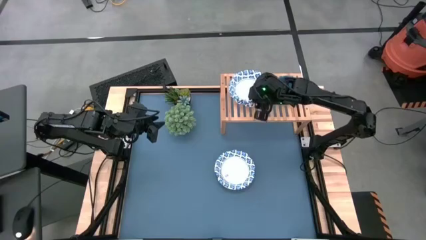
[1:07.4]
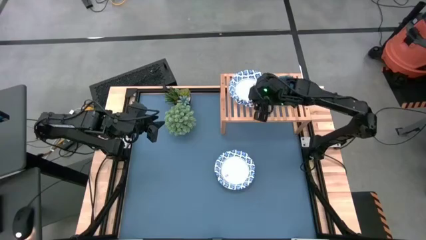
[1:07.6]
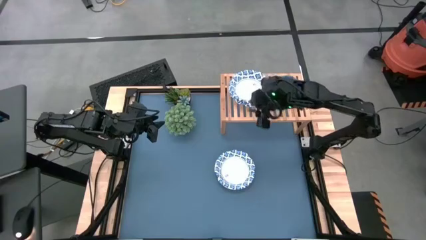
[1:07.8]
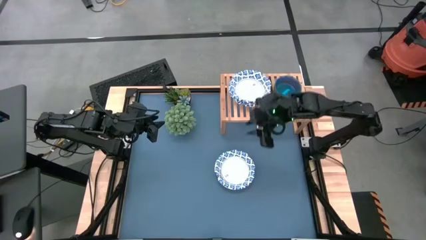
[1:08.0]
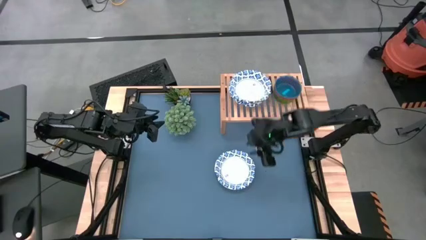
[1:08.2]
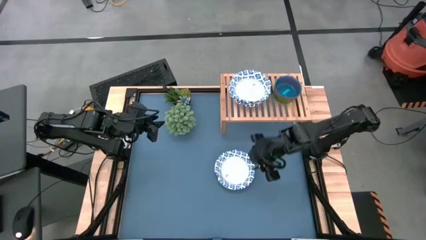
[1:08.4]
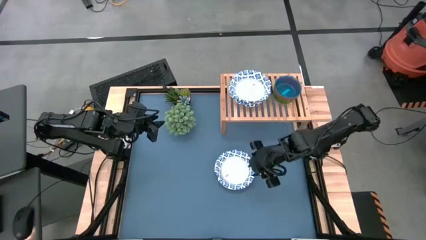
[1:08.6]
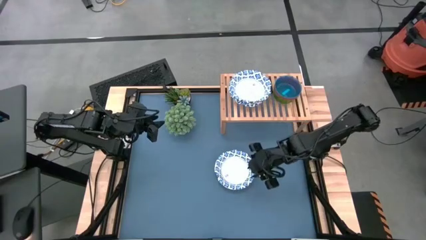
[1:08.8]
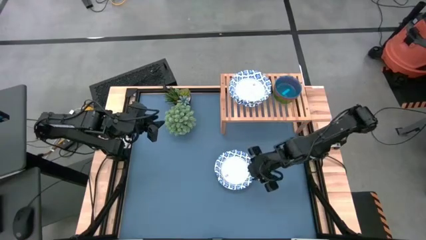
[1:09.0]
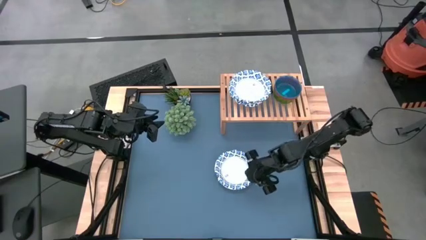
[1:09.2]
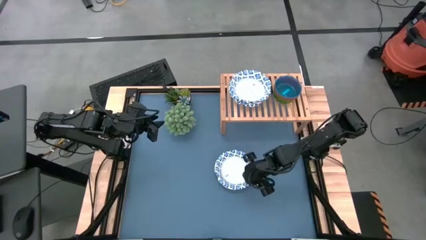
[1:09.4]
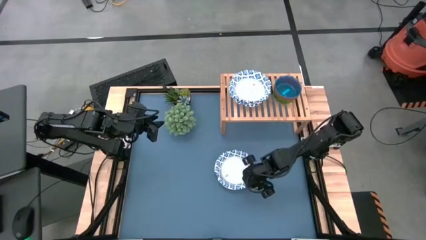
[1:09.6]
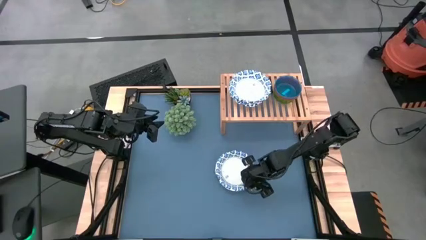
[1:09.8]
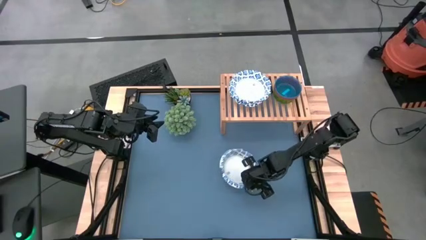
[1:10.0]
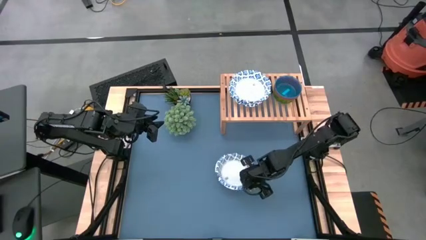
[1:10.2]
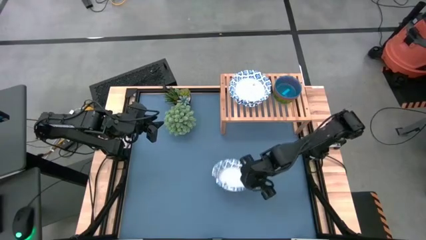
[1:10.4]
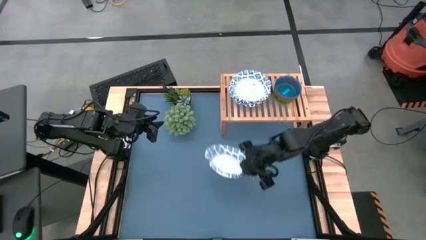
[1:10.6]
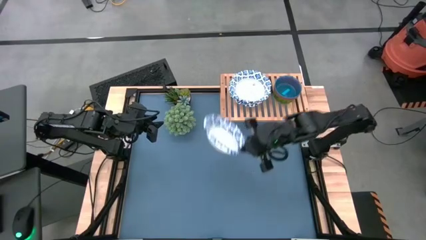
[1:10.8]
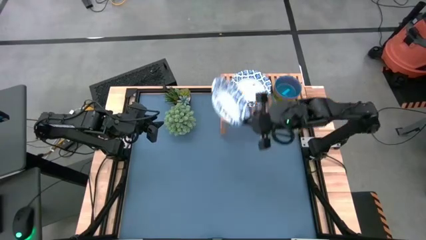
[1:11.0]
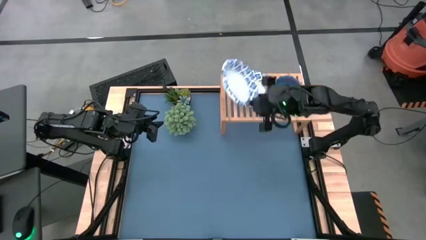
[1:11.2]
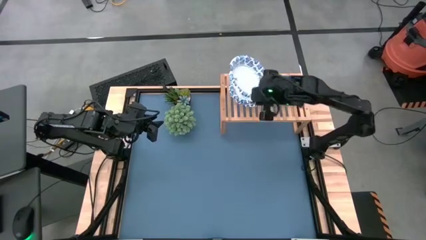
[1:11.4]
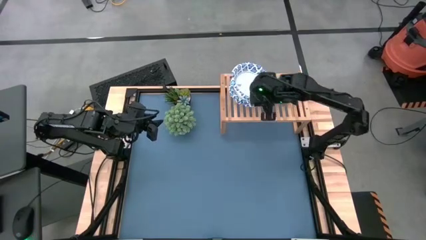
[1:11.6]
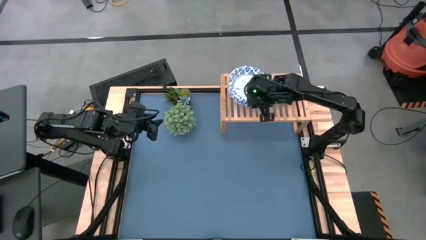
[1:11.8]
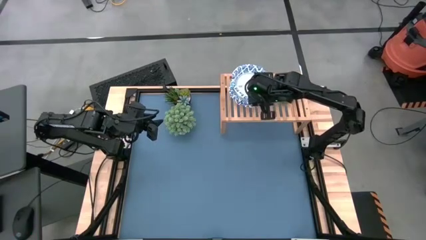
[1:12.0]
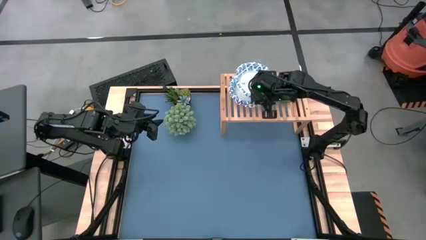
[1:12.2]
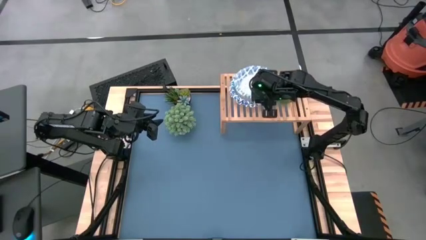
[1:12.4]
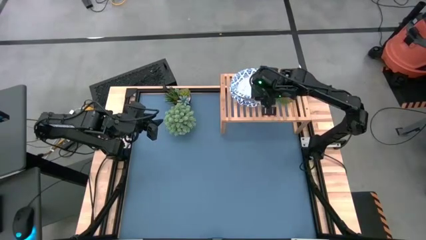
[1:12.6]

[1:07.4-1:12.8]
Task: Place and stack bowls onto a shelf
Stack the blue bowl on top of the blue bowl on the shelf

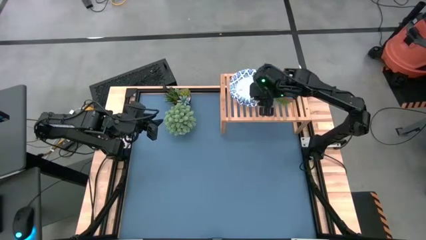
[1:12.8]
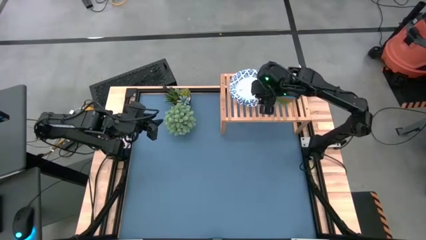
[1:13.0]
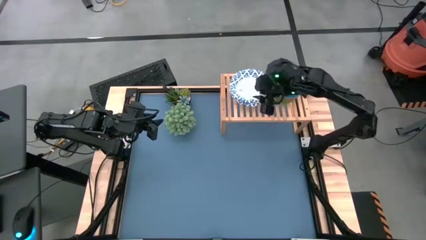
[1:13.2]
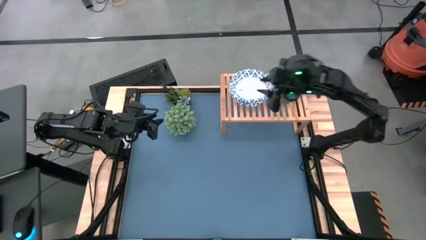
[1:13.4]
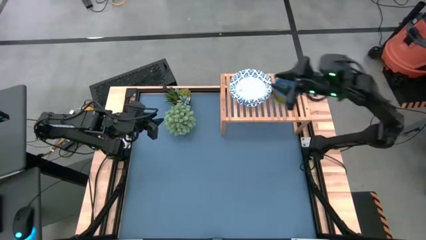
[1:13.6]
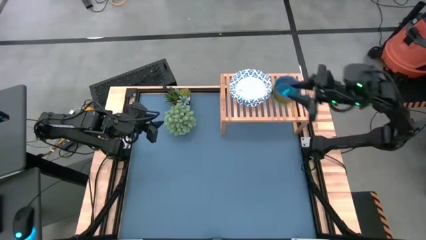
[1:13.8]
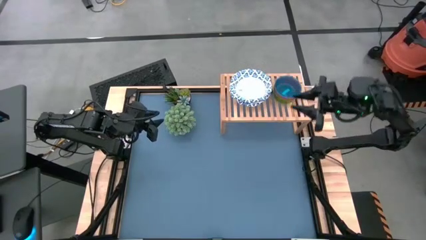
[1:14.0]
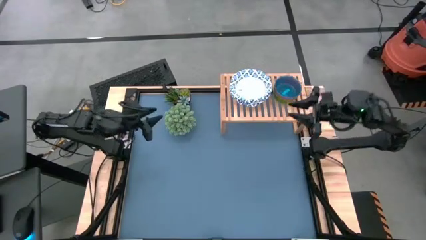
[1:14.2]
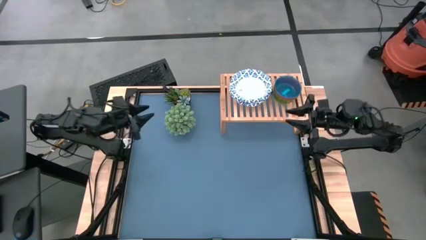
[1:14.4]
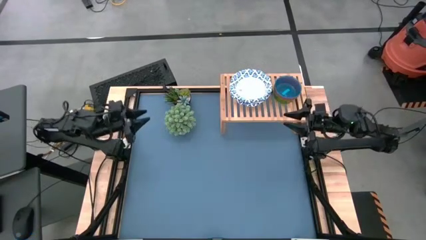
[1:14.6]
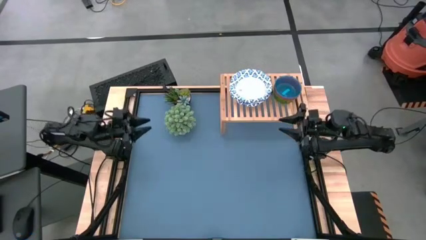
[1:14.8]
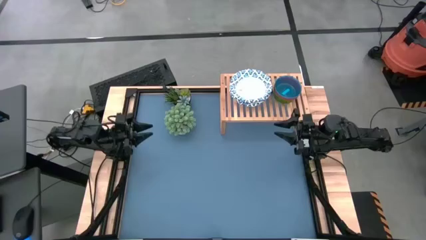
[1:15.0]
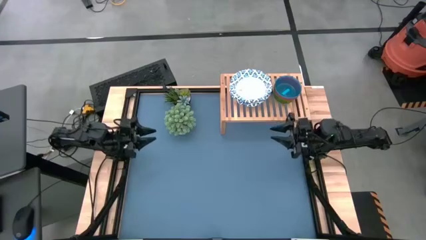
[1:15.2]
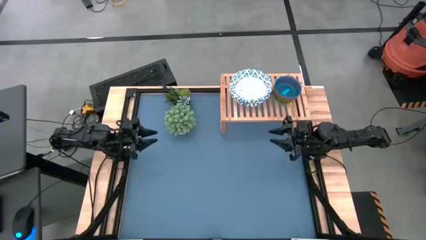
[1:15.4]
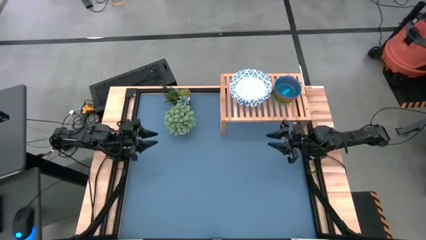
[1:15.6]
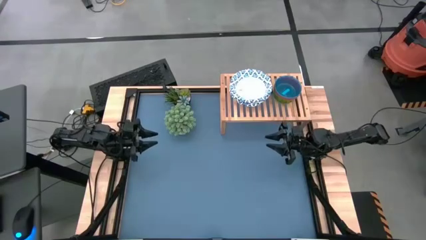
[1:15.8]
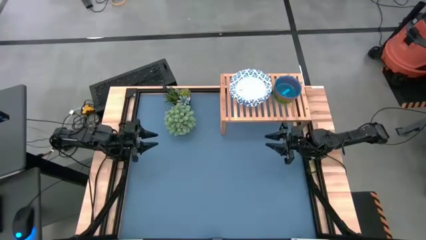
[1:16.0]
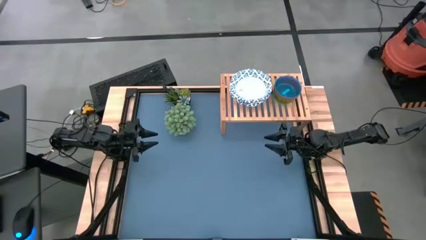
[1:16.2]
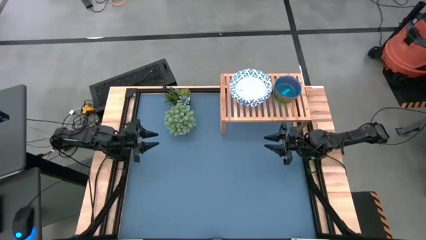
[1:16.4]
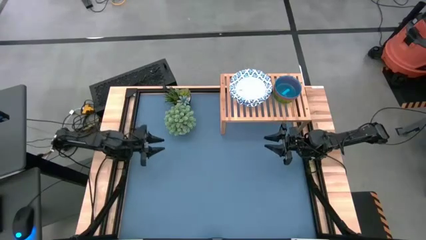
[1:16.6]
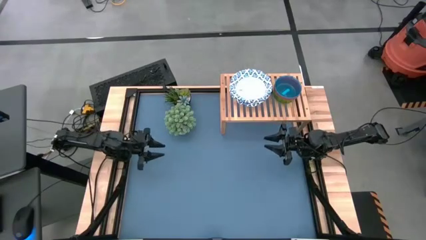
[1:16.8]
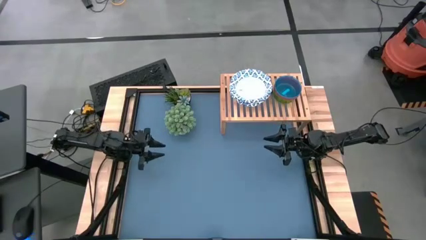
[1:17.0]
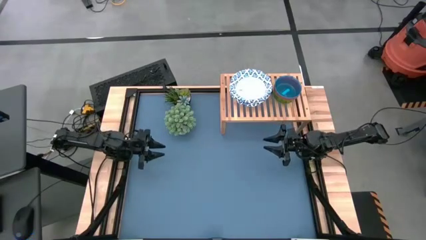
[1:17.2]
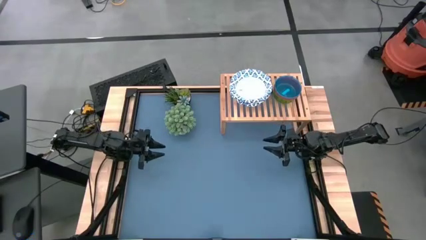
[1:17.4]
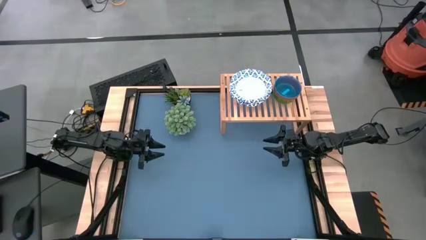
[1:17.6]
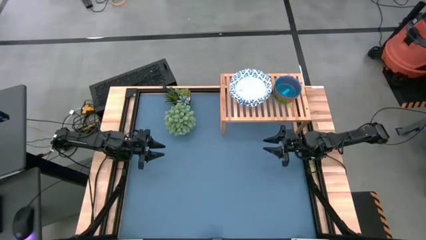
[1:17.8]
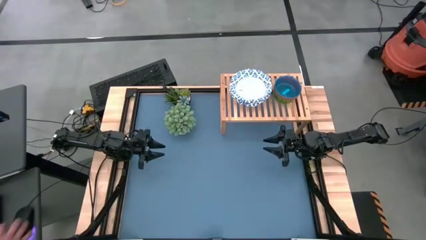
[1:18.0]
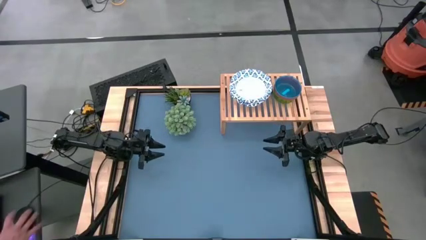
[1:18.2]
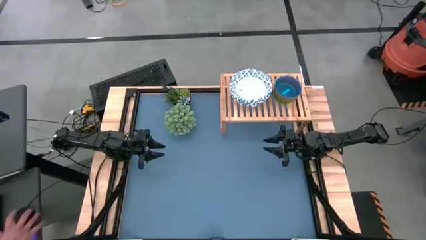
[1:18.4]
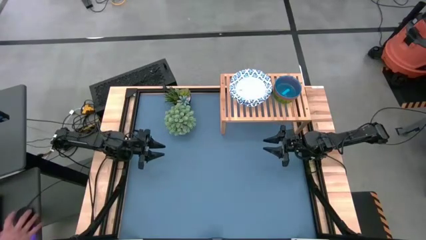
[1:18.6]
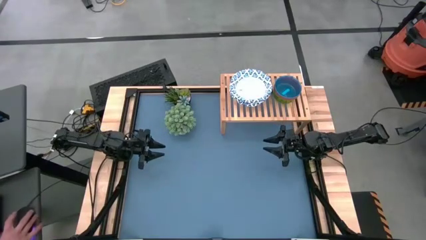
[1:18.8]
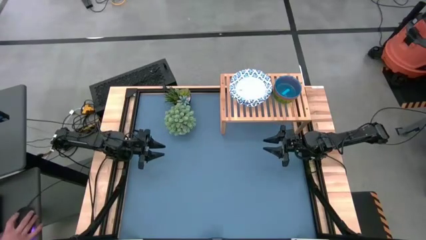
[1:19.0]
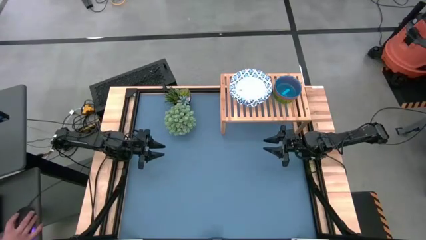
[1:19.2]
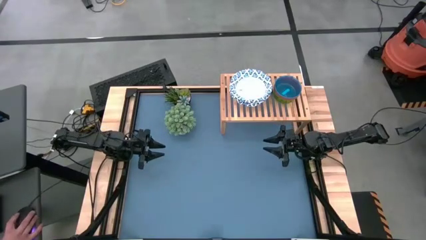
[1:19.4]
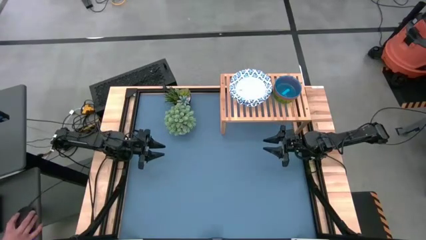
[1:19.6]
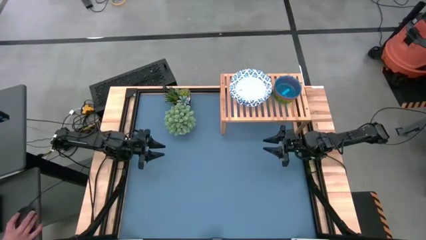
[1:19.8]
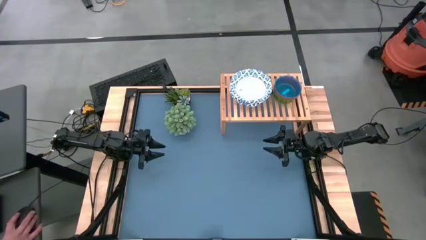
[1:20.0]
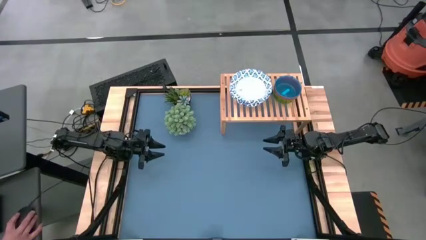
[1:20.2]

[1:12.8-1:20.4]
Return to Home Position

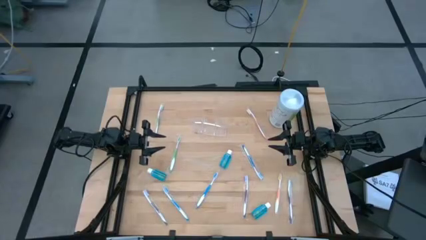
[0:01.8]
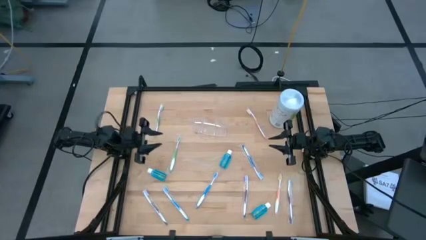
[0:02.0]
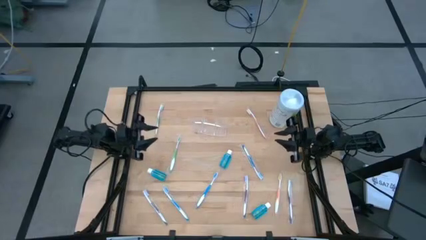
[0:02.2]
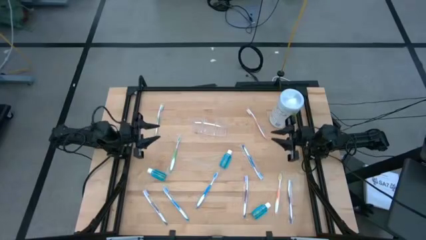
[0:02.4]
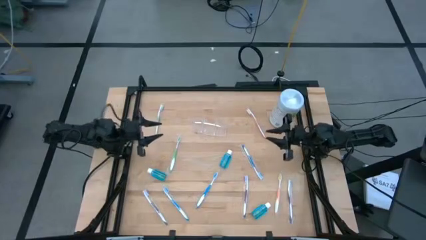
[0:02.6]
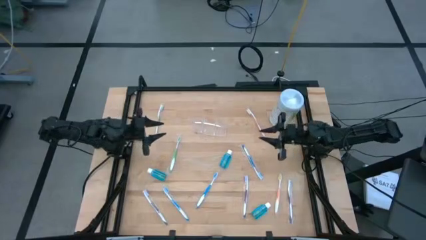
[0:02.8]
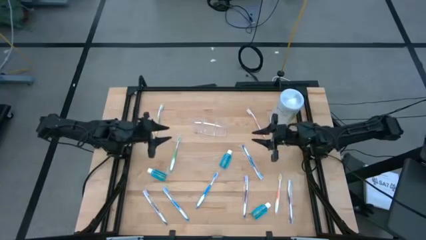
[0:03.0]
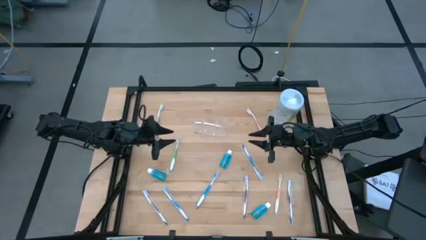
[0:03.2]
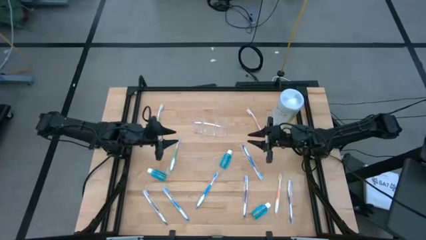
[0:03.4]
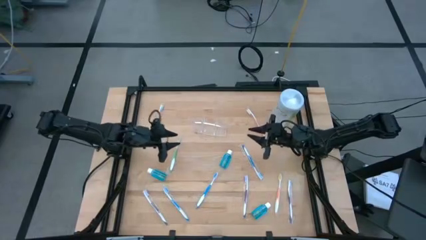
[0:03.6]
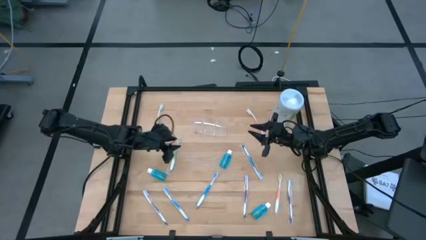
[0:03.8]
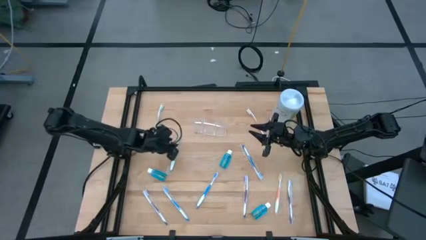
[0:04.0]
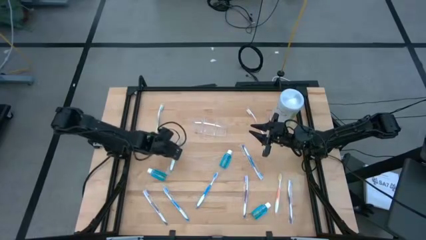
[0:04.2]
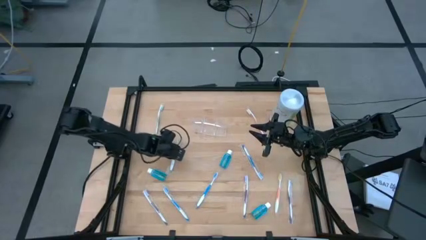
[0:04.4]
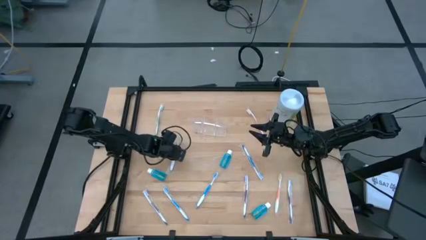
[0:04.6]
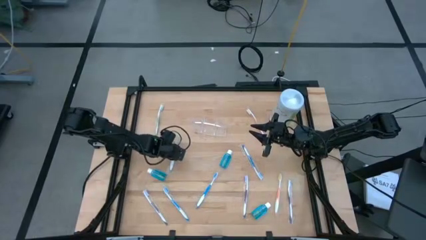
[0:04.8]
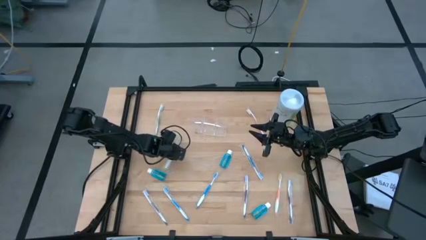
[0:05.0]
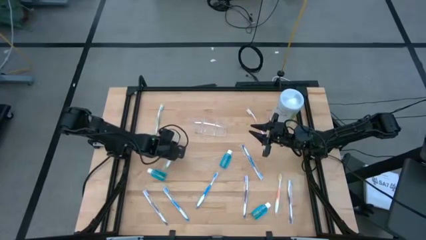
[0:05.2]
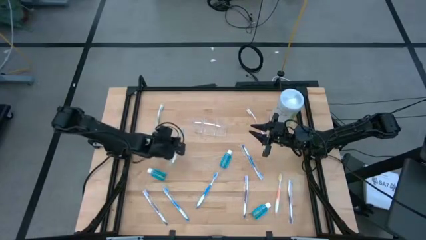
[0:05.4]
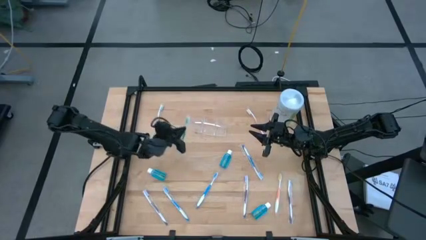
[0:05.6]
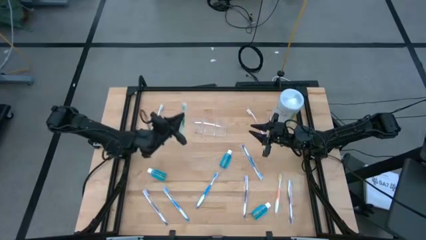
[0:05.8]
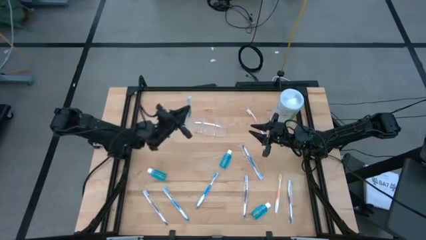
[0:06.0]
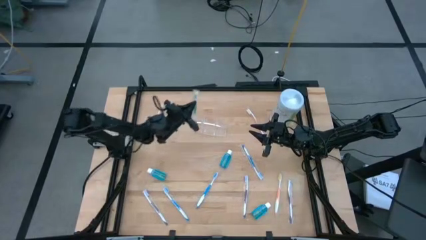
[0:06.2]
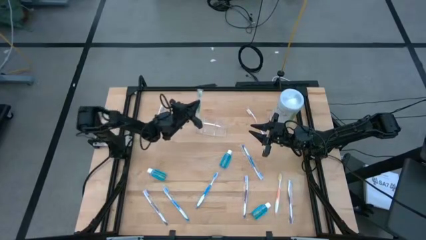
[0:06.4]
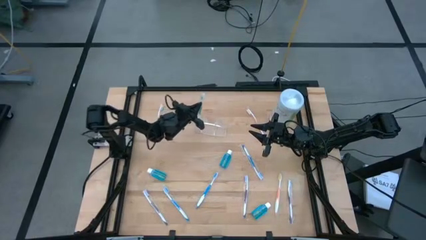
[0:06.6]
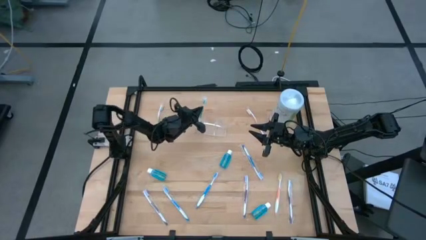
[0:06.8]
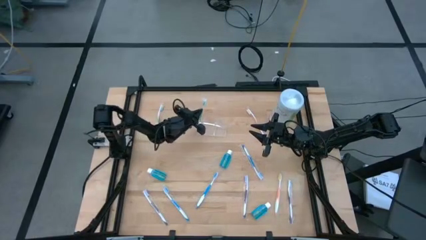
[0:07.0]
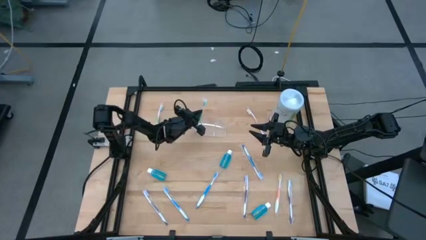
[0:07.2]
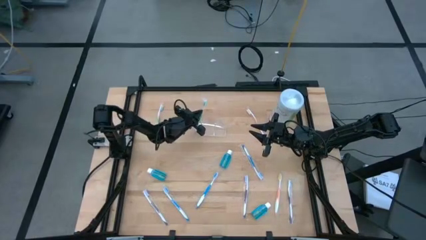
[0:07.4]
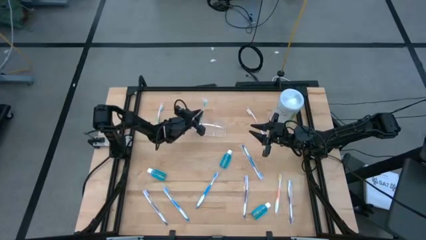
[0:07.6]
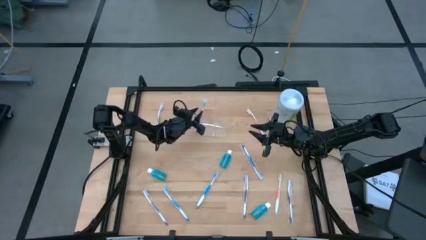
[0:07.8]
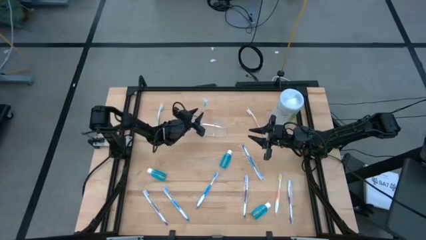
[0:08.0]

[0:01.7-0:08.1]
Task: Pick & Place toothbrushing station
Put the green toothbrush into the left section of the transparent organizer
